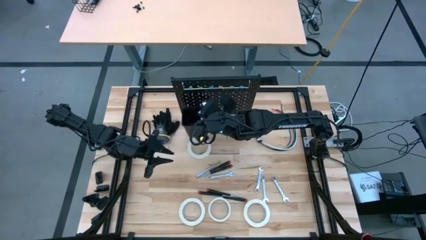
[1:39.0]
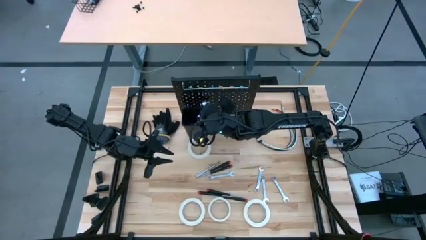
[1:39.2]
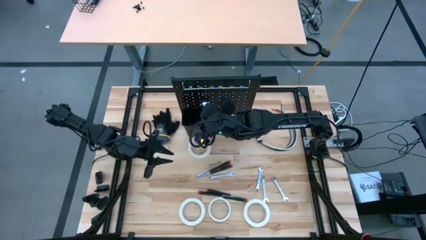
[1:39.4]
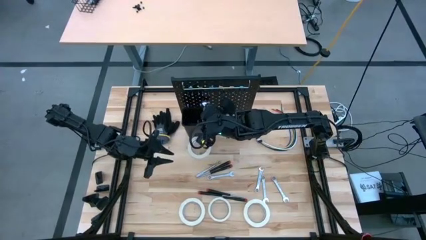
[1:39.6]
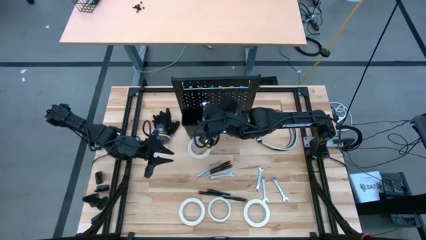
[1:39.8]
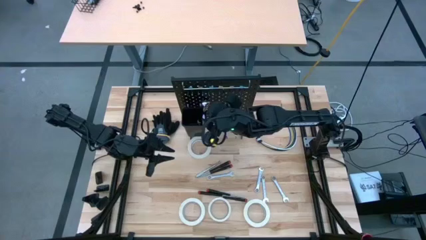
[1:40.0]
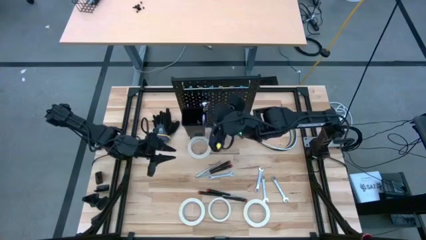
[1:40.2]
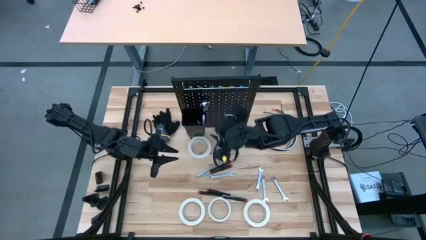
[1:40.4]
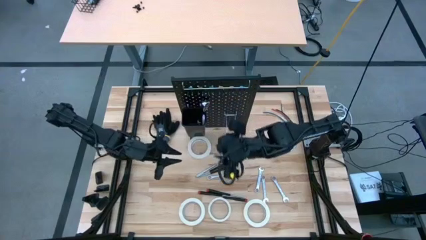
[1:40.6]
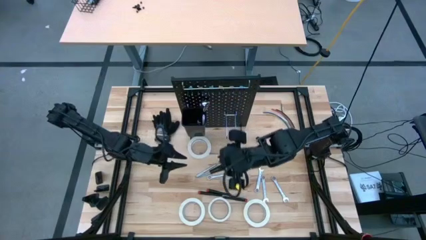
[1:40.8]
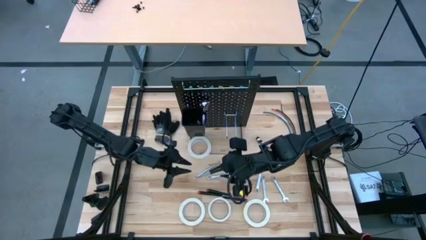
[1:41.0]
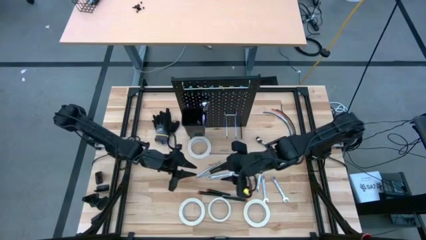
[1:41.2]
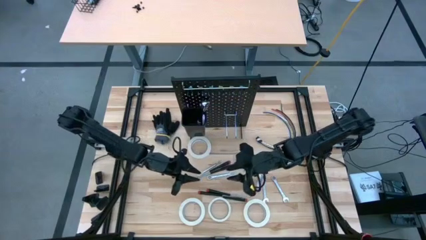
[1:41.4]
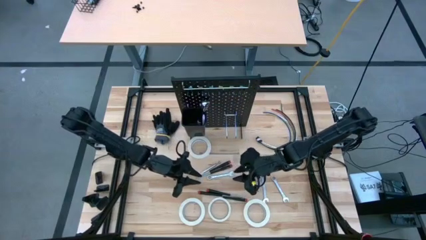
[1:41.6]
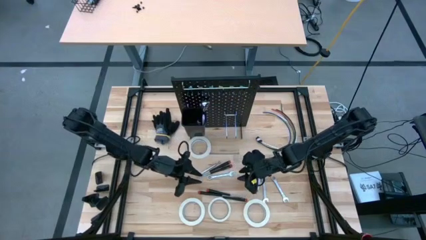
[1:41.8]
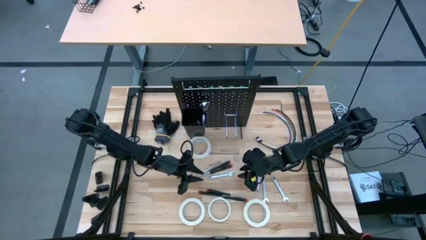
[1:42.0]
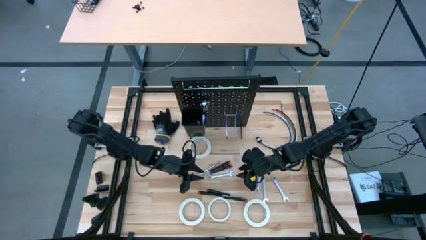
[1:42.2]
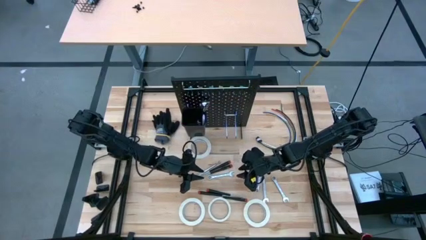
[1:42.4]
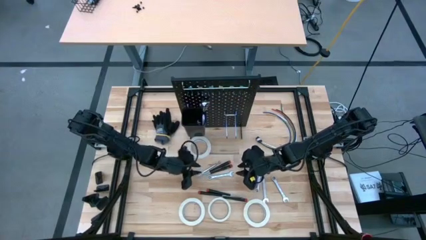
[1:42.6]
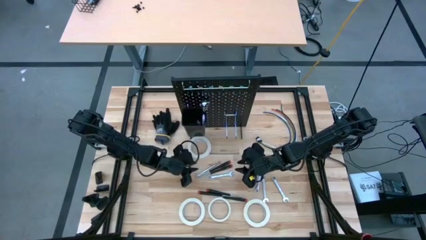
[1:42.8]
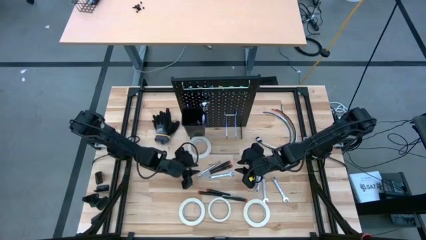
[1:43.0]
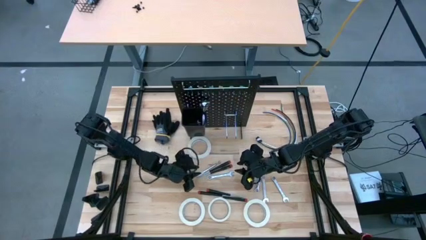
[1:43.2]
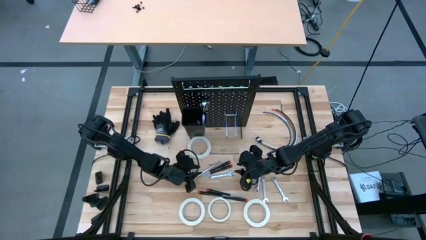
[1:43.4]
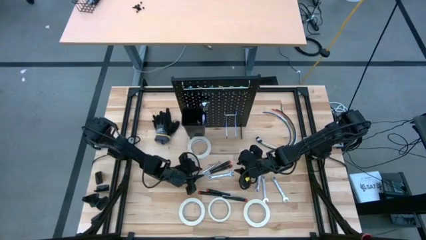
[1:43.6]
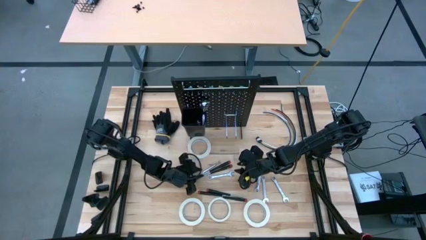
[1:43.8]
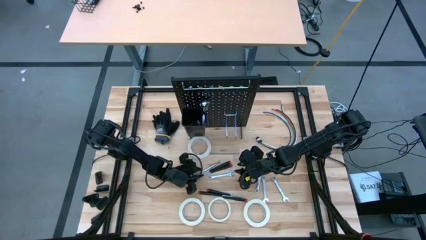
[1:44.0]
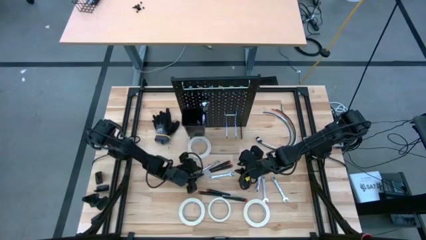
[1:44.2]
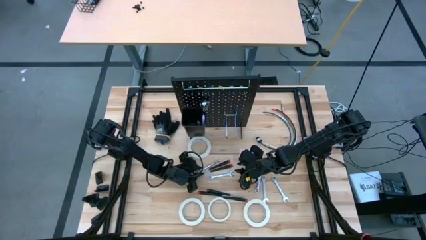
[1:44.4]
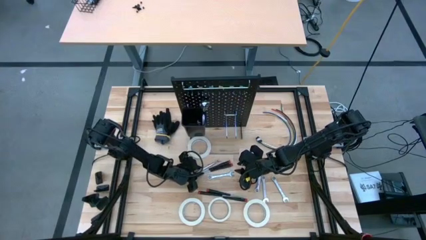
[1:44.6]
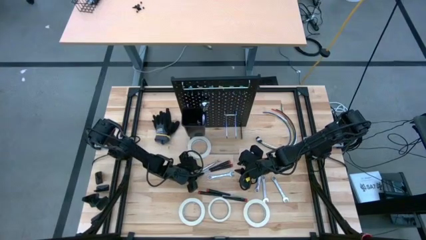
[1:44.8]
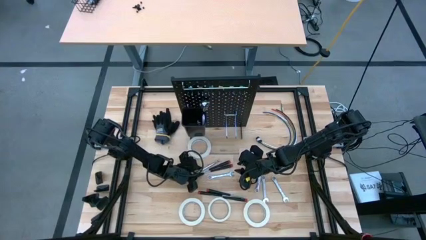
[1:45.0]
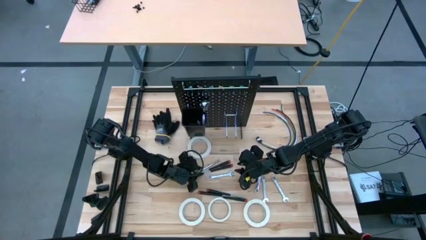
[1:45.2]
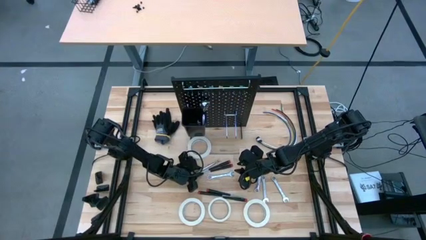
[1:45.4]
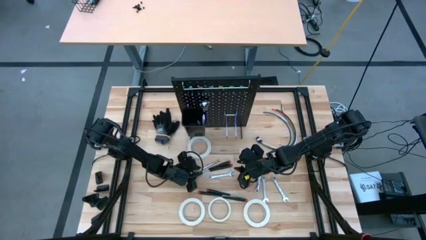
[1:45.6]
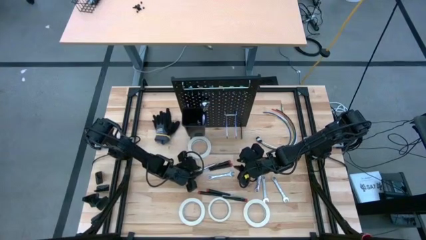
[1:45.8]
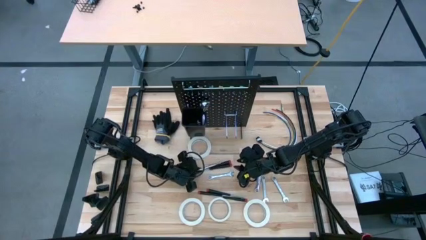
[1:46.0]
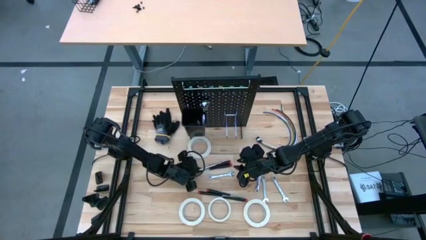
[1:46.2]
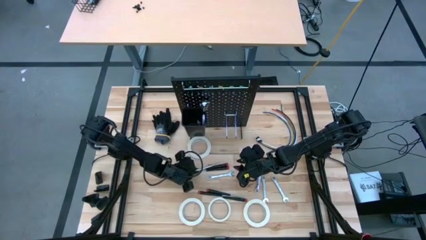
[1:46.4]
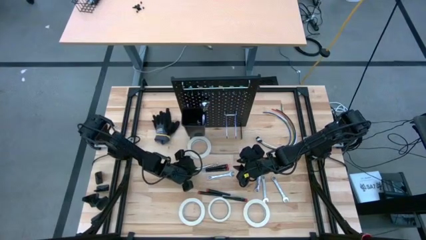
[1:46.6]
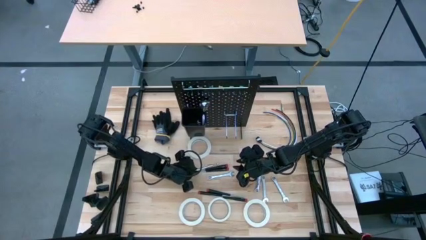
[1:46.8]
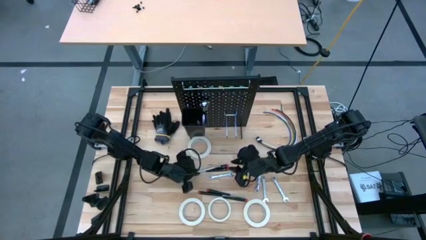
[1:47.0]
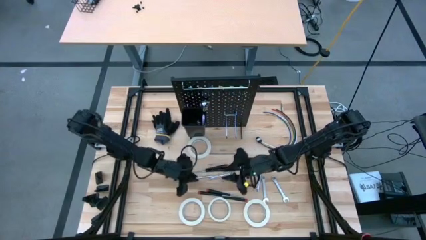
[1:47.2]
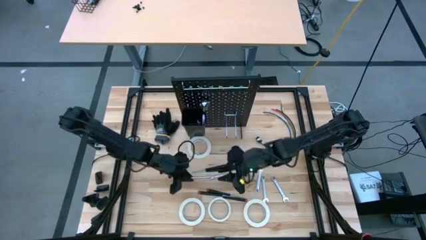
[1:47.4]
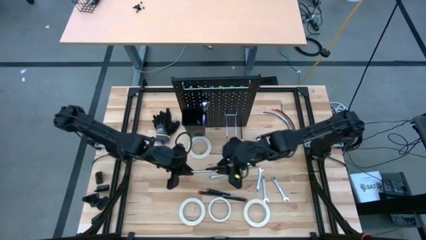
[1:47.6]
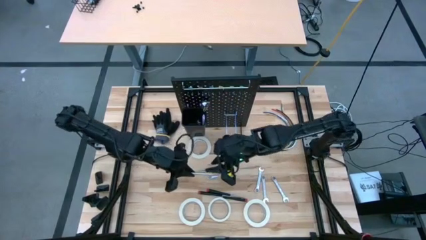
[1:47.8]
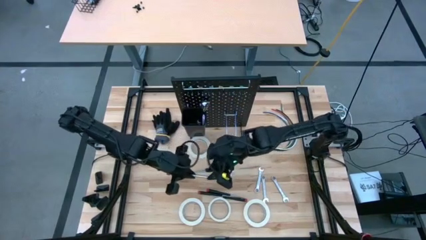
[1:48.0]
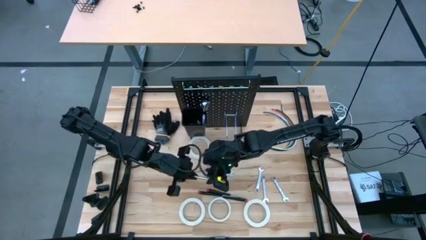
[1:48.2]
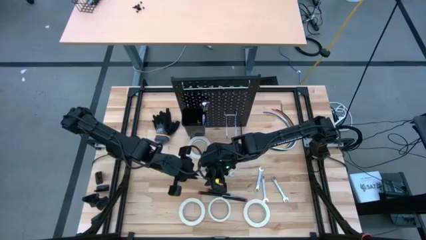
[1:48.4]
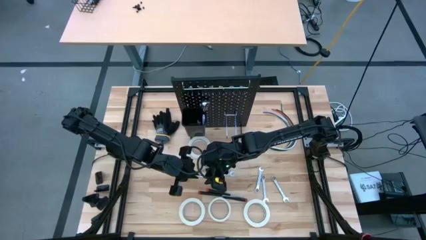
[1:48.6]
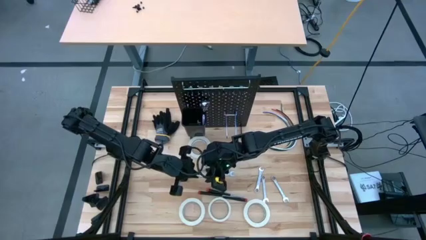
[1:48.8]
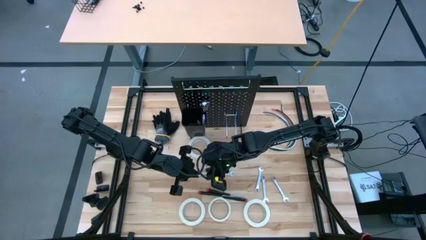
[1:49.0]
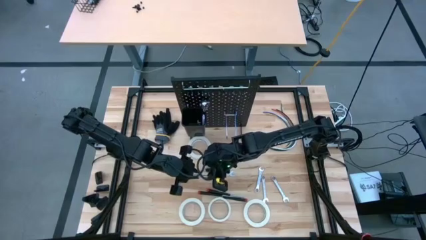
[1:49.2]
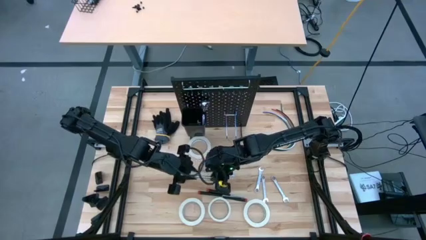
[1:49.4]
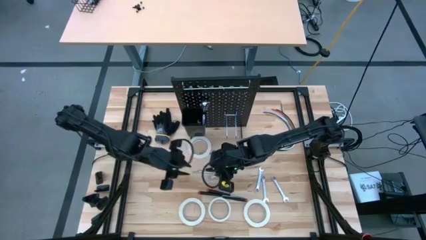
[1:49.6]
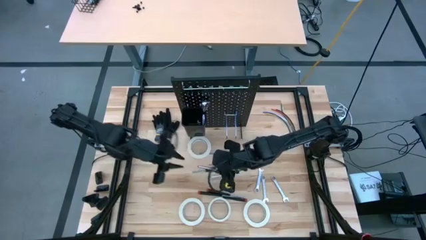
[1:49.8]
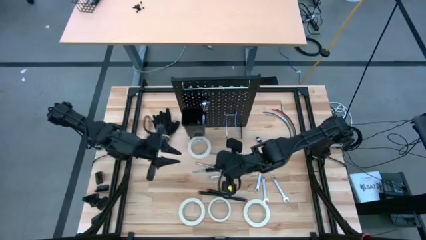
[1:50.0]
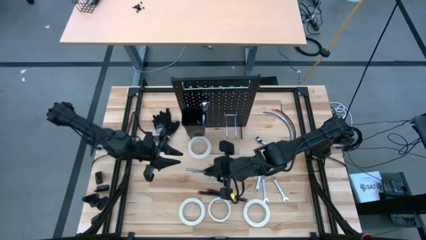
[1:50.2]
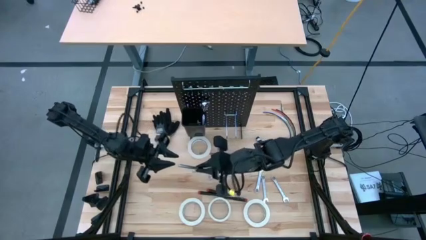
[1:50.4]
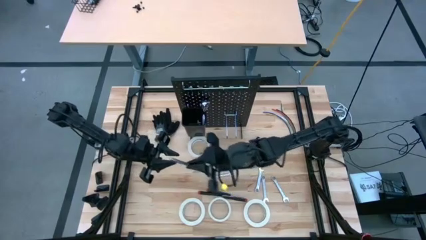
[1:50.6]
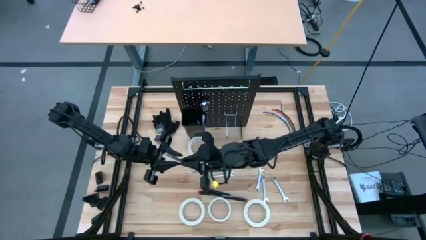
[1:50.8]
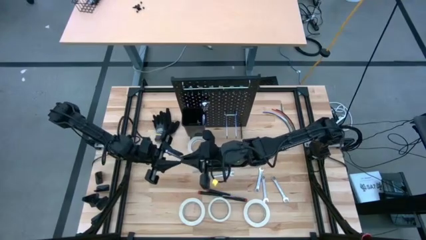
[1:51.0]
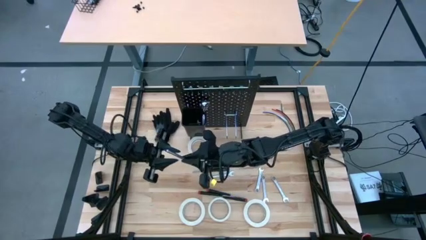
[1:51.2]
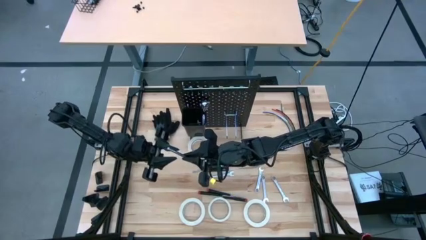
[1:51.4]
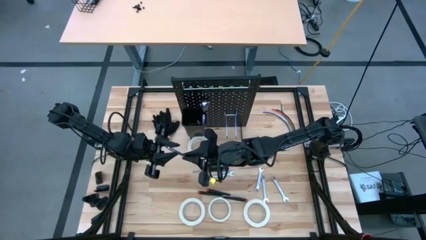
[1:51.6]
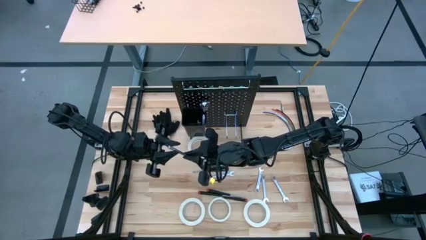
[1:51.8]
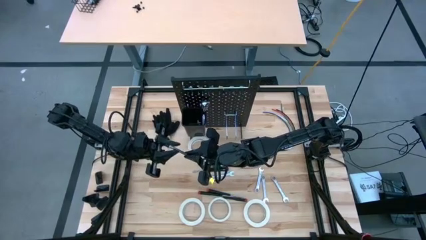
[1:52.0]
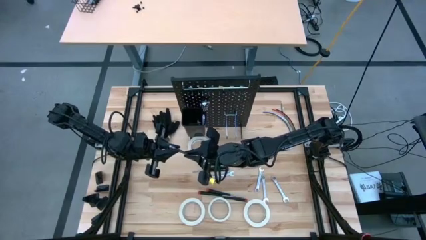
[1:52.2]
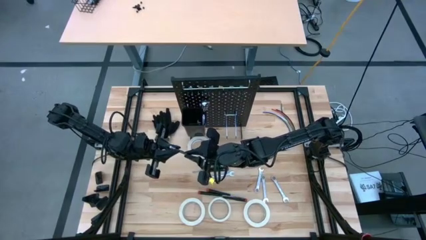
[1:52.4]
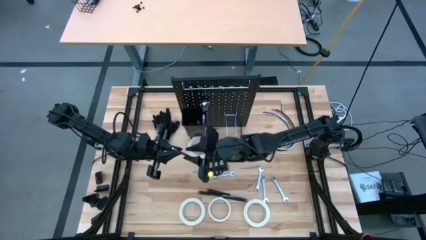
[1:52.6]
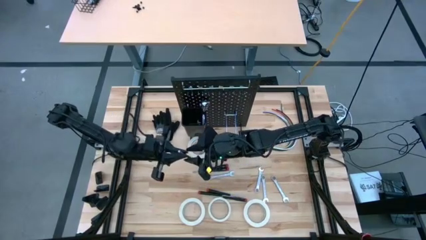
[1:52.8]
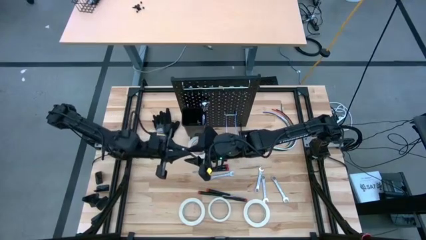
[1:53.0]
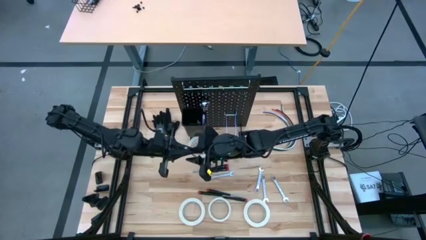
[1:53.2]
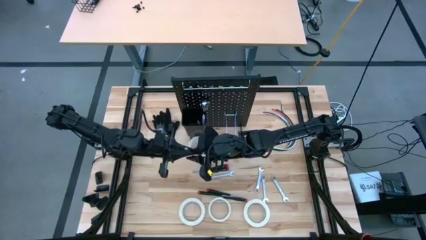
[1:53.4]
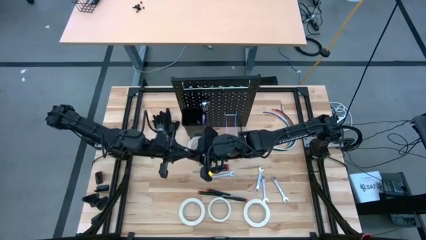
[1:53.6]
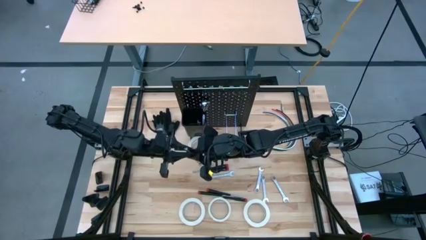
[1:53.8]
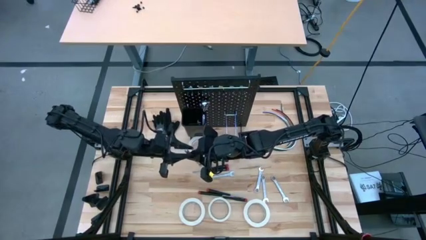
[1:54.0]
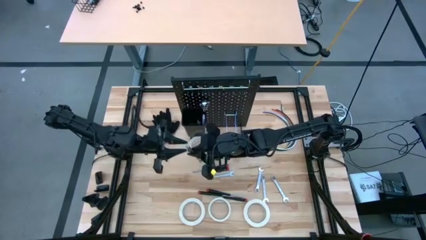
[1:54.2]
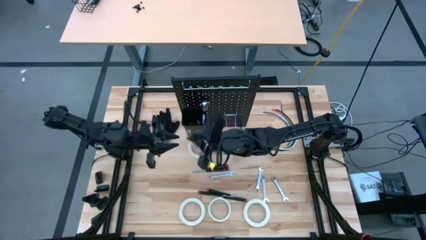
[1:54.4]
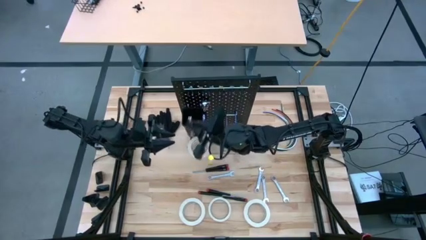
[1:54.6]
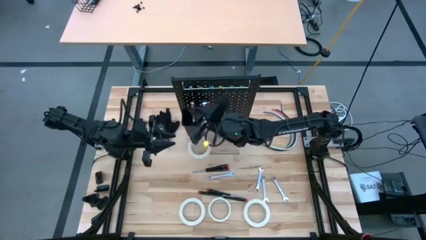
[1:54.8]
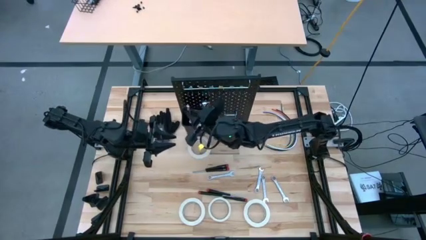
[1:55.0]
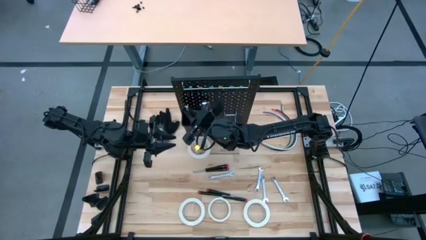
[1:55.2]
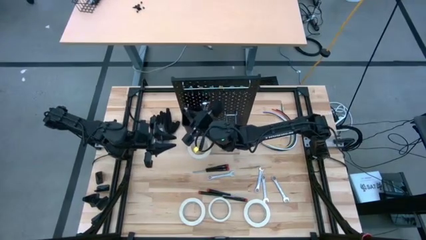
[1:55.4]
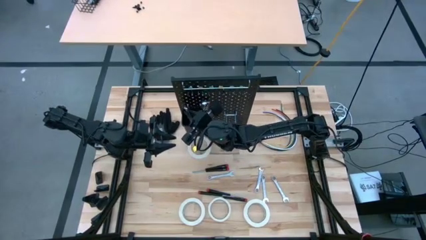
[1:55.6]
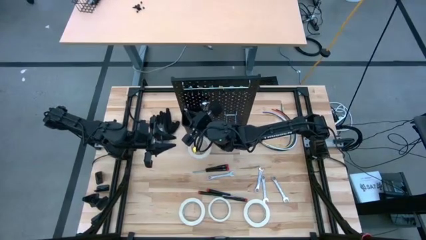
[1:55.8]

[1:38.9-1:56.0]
Task: Hang tools onto peg board
Put the silver magnetic telescoping tool into the black bin on the peg board
